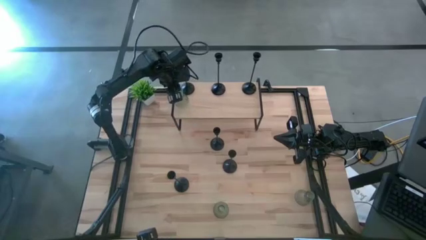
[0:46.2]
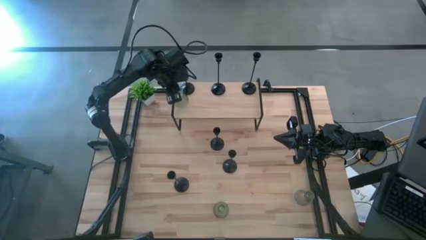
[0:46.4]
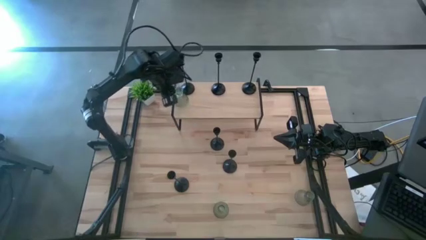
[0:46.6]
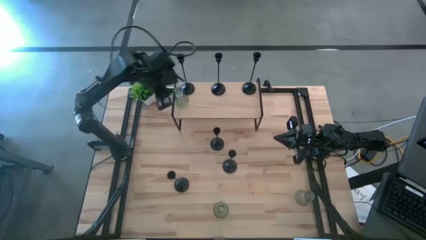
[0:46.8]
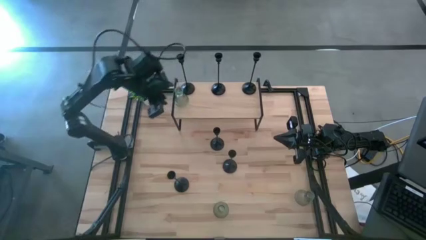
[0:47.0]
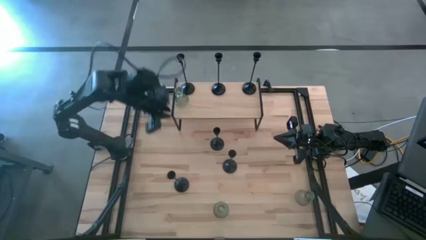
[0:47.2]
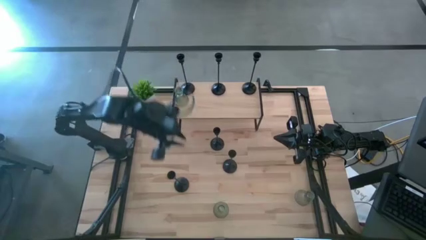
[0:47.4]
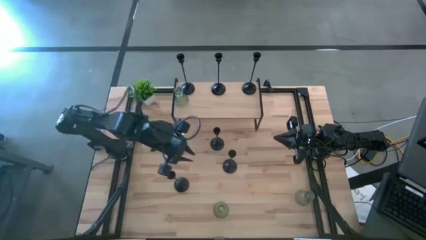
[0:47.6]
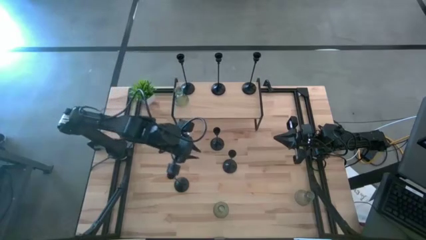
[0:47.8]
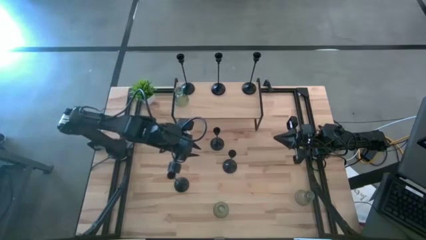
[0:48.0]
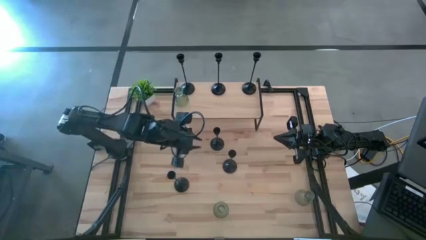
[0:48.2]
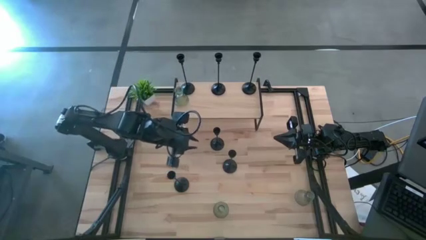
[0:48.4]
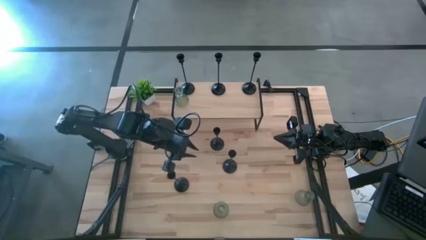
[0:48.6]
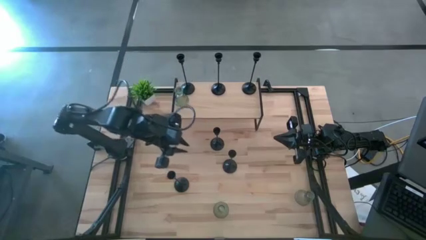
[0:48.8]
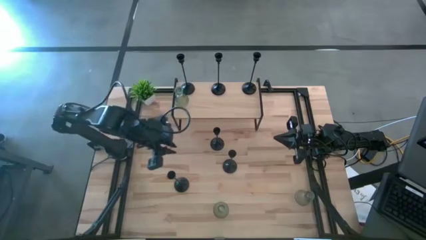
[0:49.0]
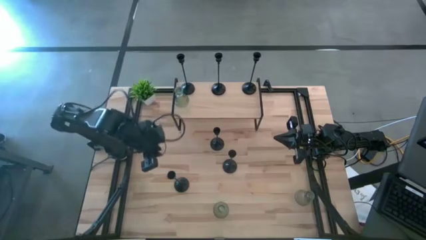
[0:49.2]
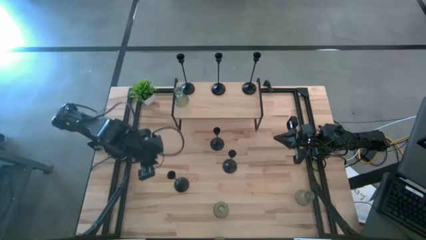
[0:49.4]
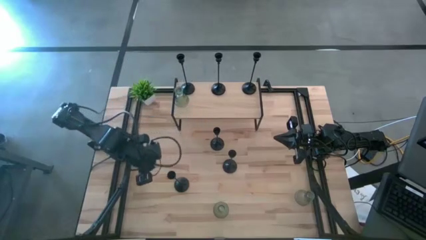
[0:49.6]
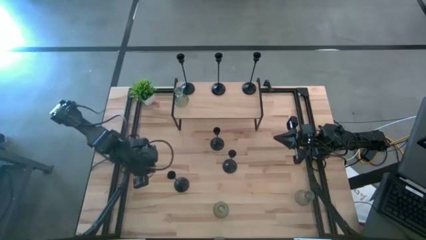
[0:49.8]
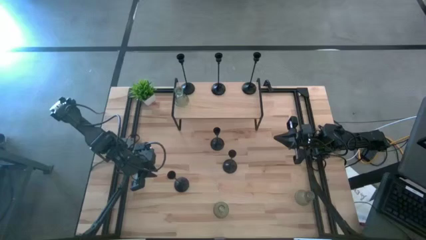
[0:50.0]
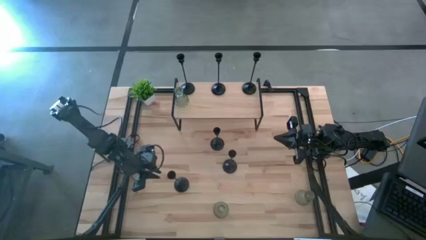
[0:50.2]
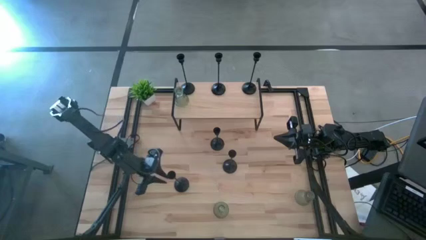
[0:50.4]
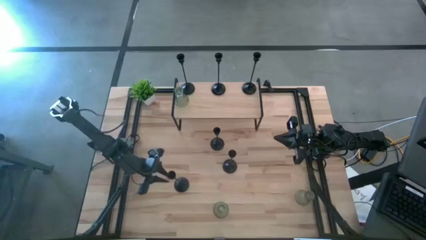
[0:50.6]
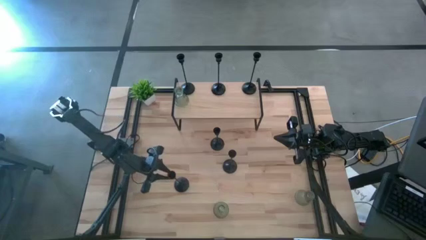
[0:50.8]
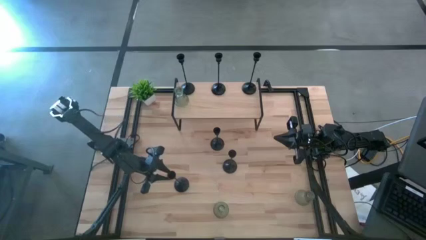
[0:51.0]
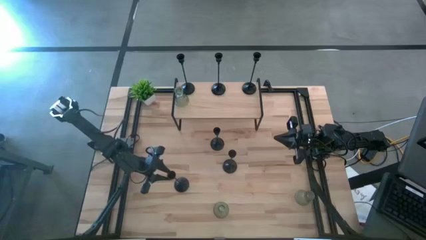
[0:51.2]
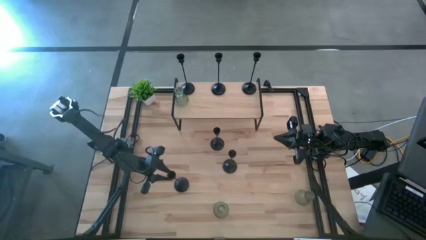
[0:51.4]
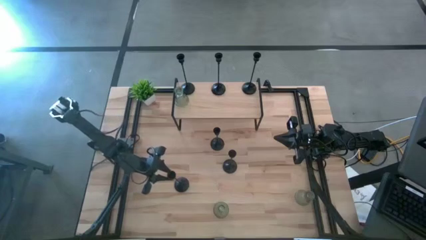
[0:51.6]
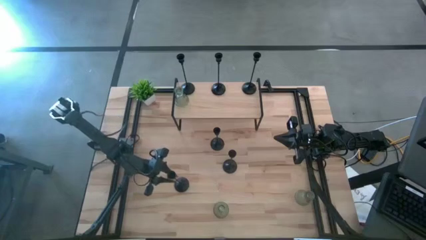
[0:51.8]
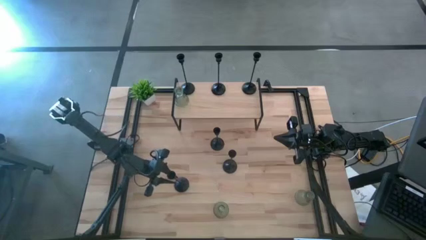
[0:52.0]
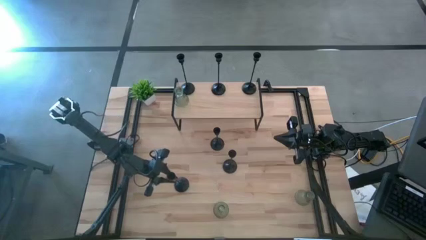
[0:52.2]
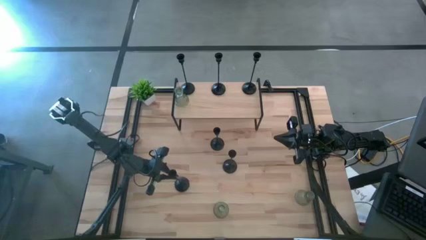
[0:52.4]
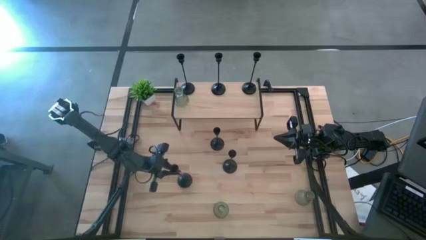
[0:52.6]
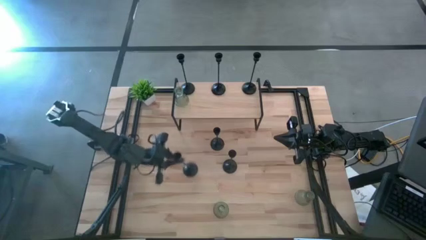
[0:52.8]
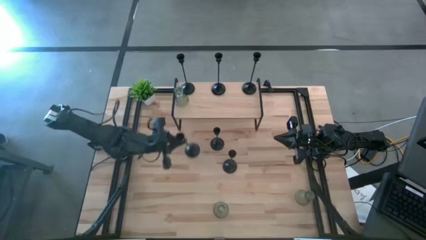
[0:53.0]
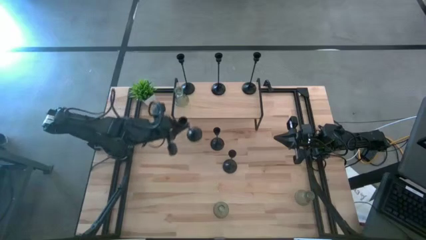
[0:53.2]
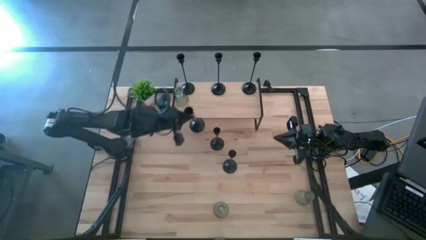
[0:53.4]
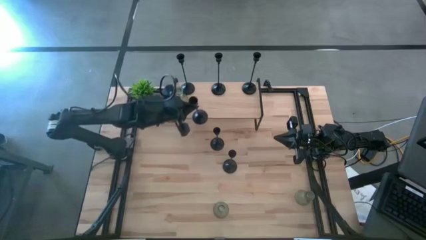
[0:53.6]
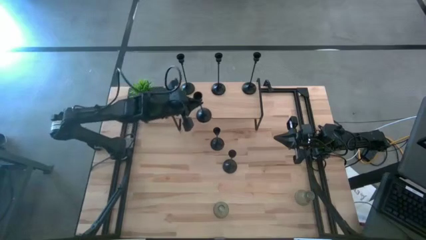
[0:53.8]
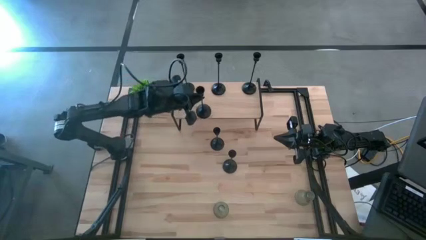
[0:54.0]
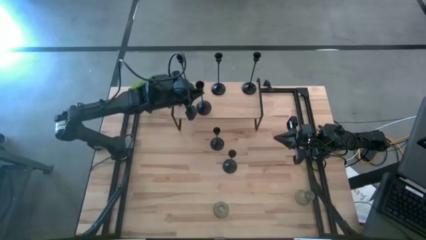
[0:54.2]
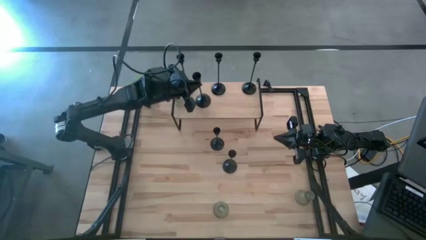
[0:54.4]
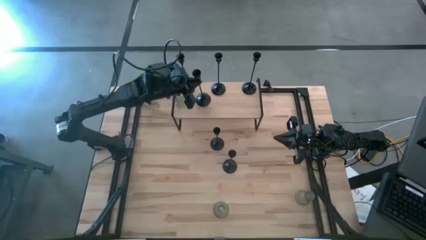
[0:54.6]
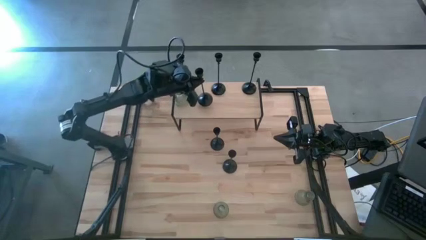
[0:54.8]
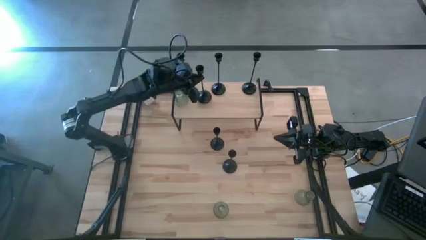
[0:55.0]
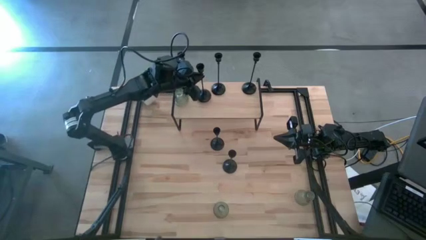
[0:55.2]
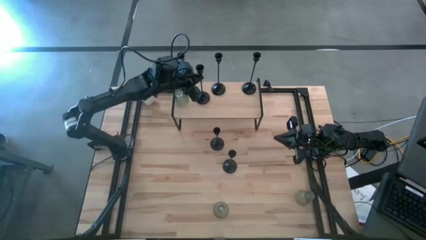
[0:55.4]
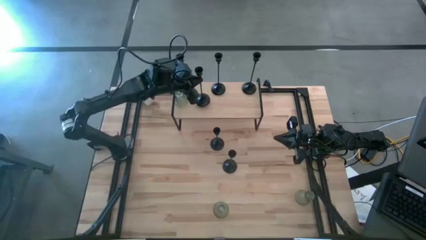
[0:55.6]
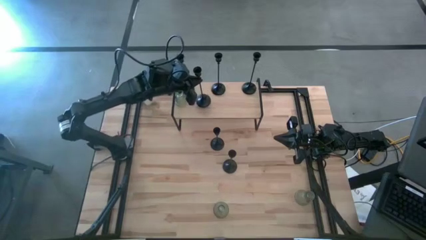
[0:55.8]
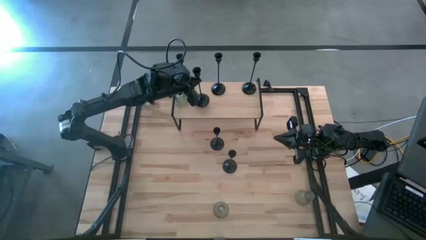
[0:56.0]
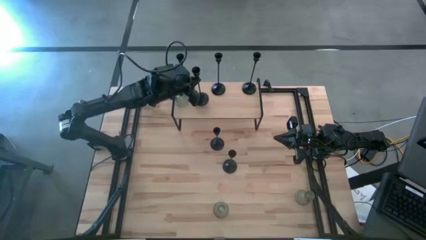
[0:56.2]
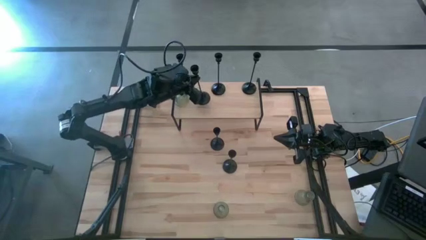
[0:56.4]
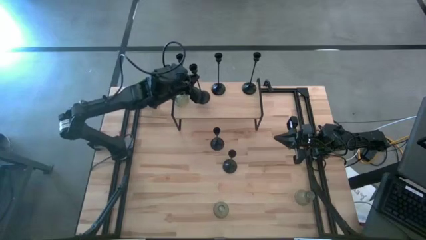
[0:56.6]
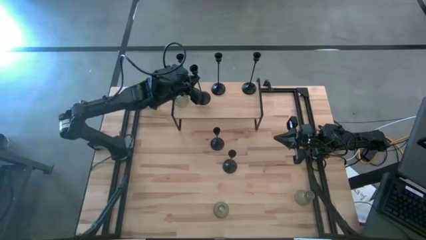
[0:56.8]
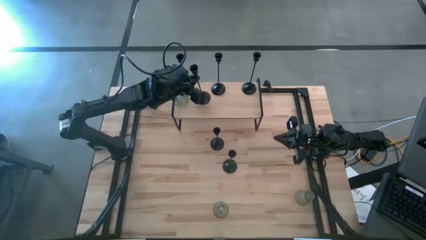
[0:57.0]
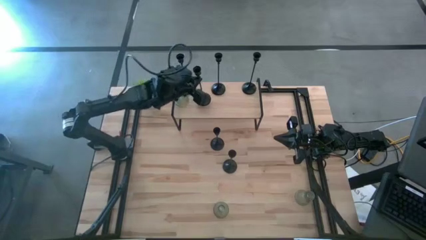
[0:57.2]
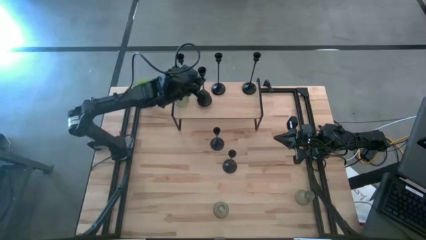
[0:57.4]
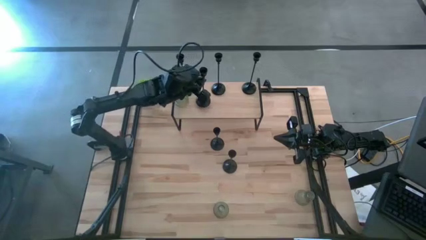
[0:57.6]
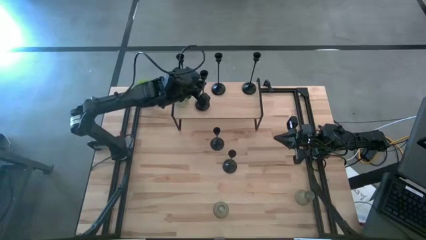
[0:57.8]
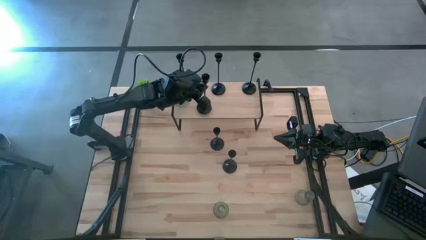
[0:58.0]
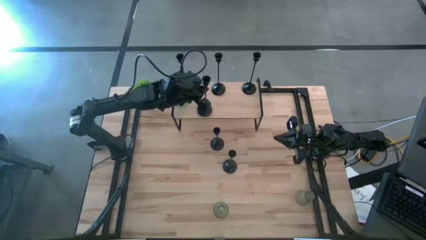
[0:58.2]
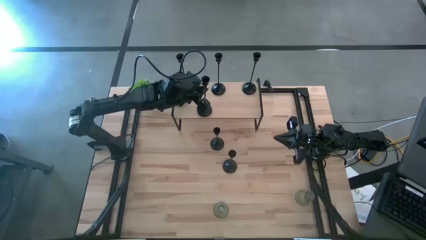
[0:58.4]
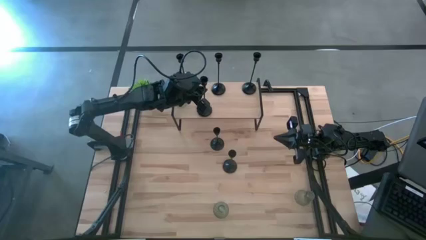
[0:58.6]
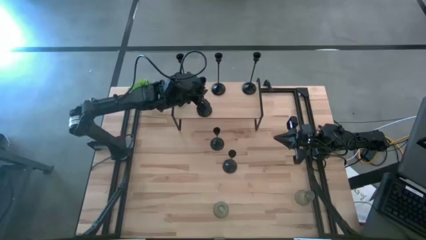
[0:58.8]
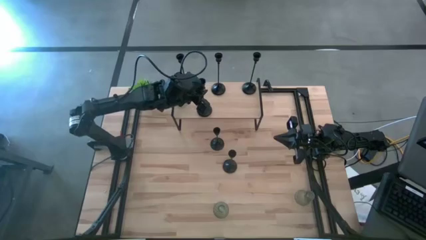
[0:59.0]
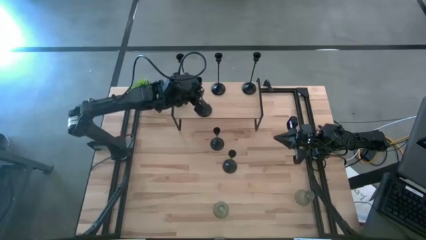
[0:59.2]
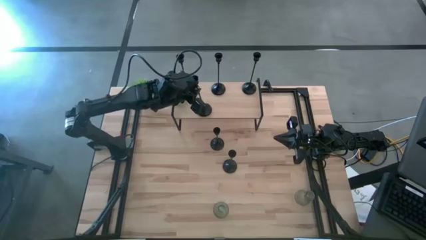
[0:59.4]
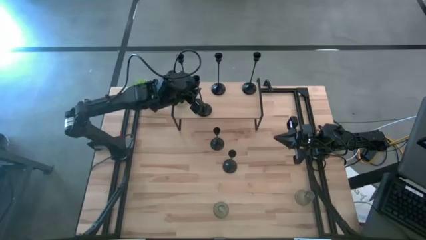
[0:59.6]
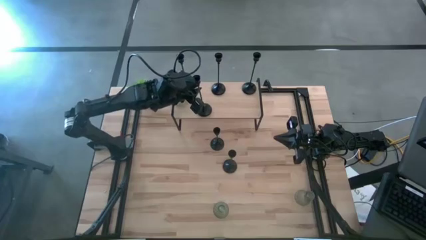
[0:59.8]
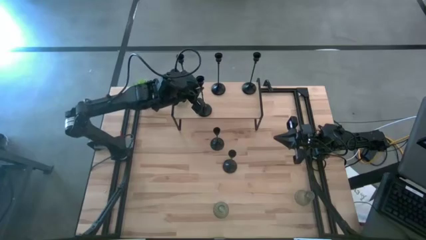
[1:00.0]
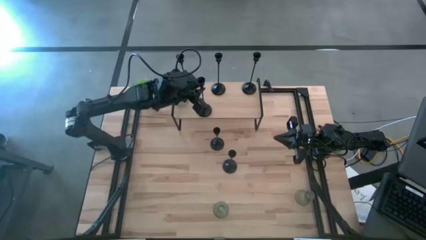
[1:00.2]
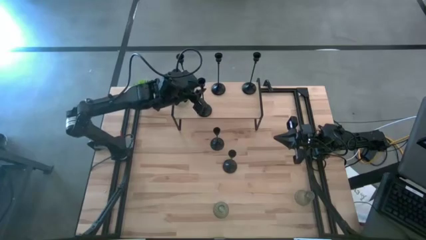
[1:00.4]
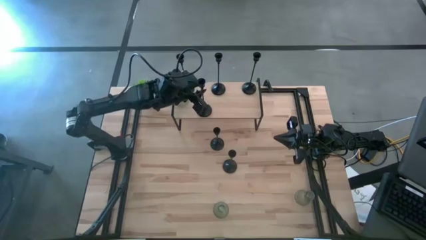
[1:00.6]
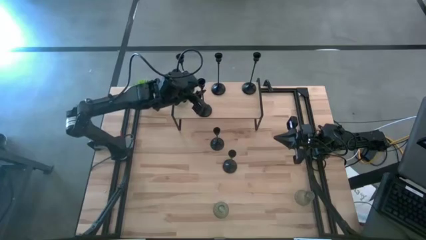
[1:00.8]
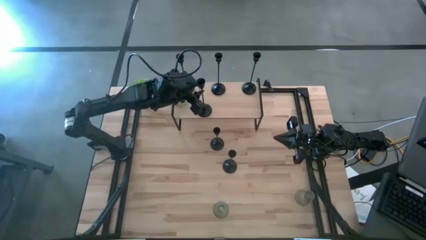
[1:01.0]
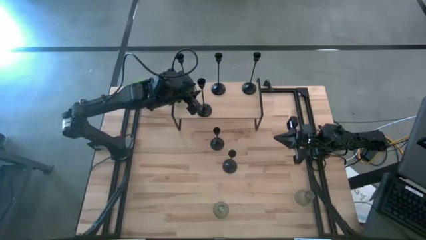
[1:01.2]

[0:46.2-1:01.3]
Task: Pick & Place candle stick holders
Put the black candle holder on the shelf

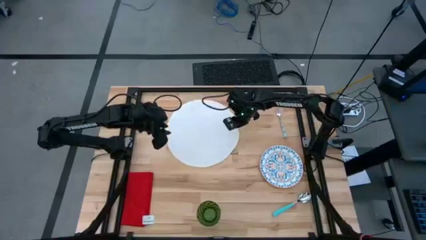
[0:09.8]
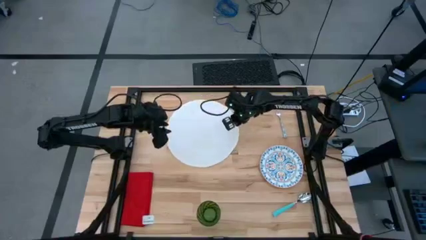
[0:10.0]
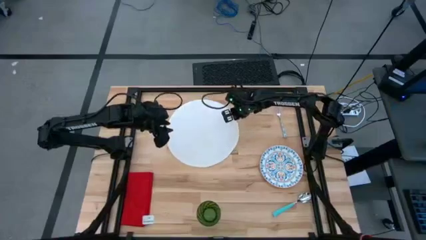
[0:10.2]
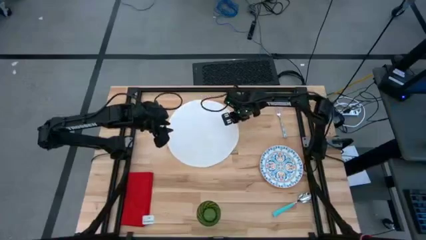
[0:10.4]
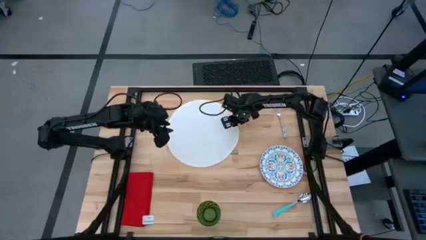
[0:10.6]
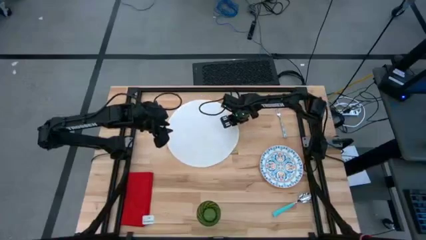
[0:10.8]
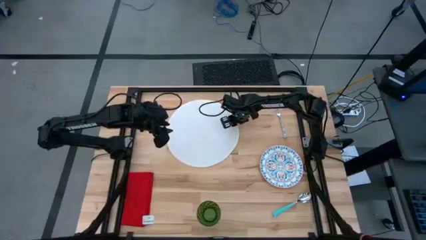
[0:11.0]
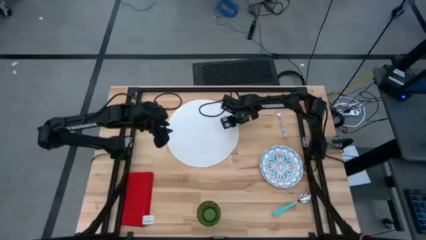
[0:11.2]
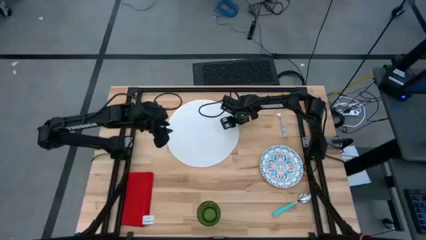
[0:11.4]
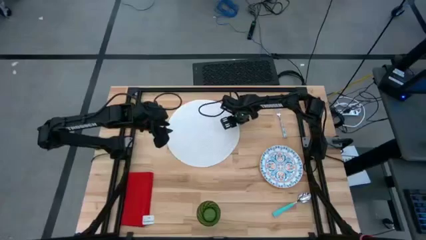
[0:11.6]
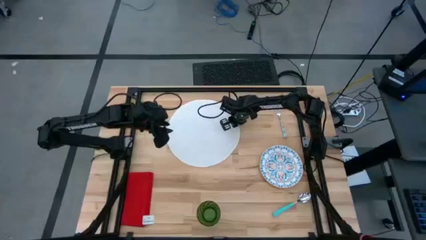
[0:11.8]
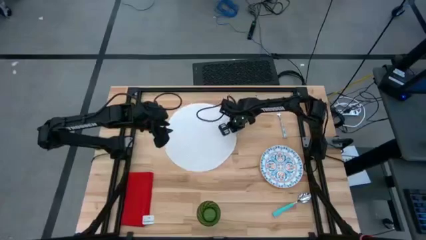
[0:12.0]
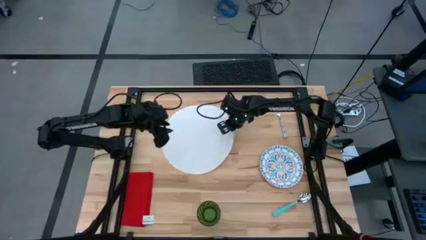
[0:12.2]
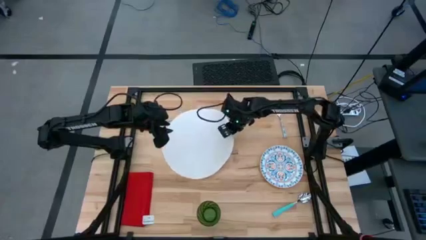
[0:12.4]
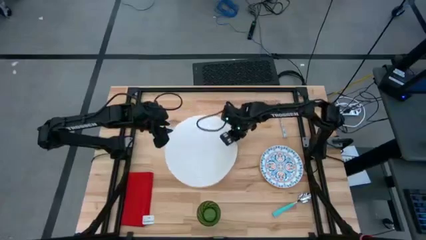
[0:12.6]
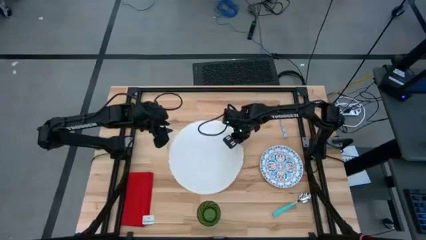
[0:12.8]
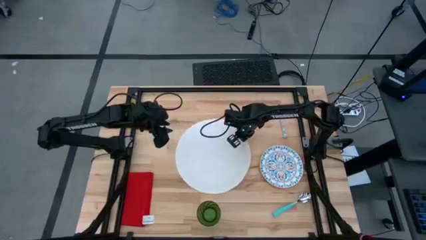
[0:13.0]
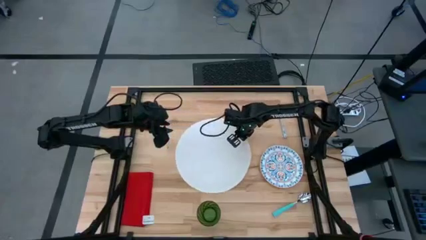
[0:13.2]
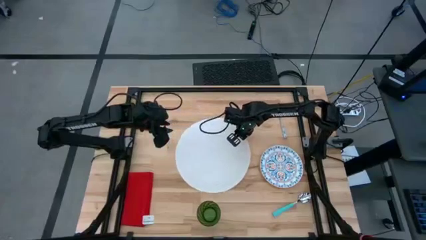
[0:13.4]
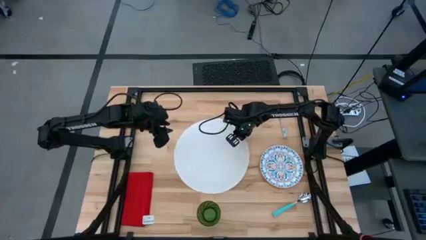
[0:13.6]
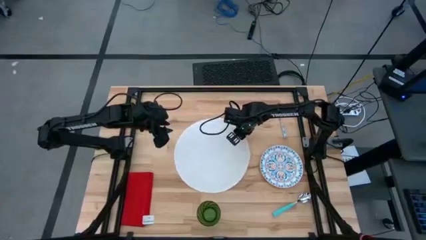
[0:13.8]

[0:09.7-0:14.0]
Task: Set table place
Move the white table mat to the center of the table
